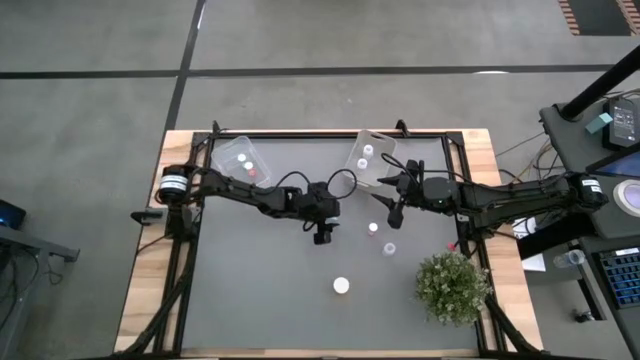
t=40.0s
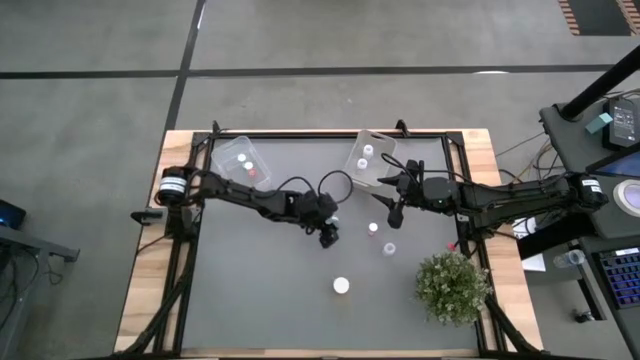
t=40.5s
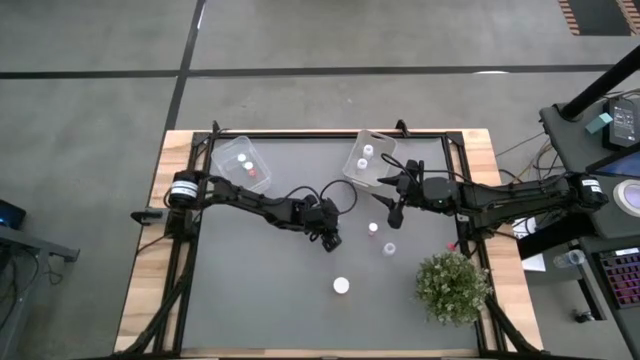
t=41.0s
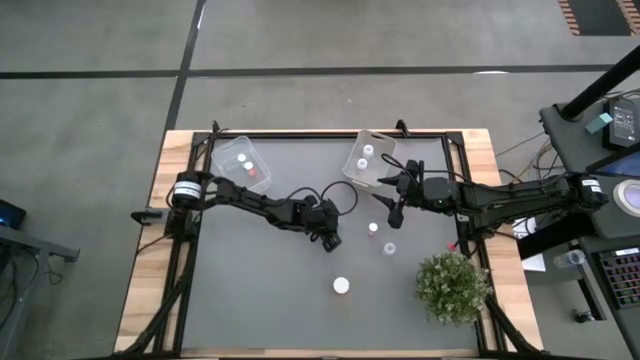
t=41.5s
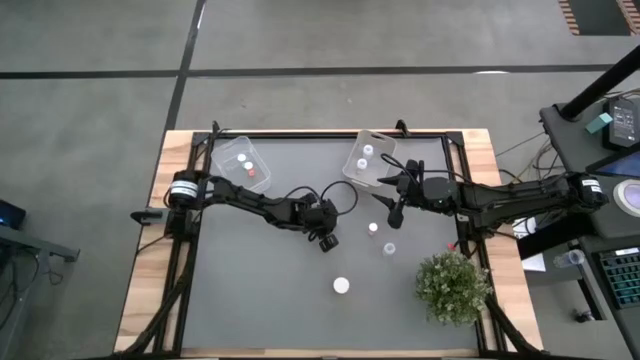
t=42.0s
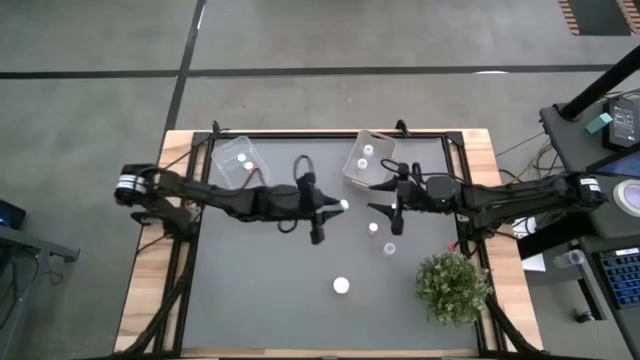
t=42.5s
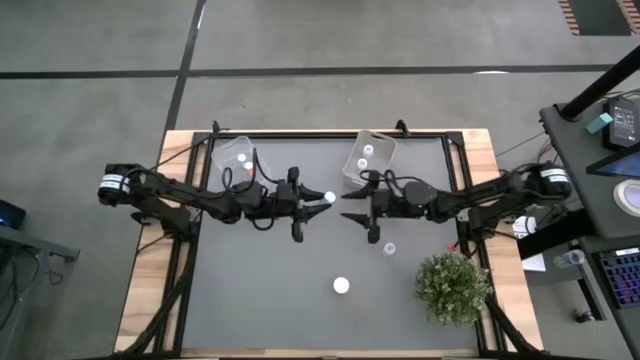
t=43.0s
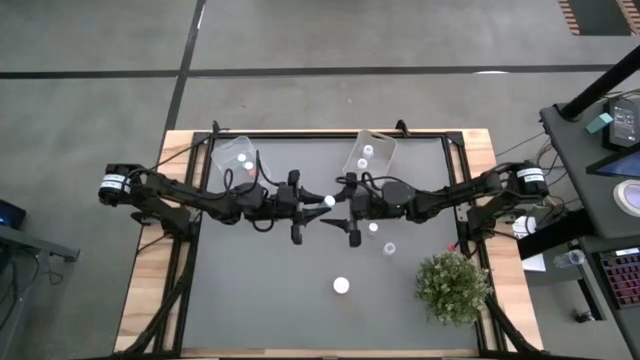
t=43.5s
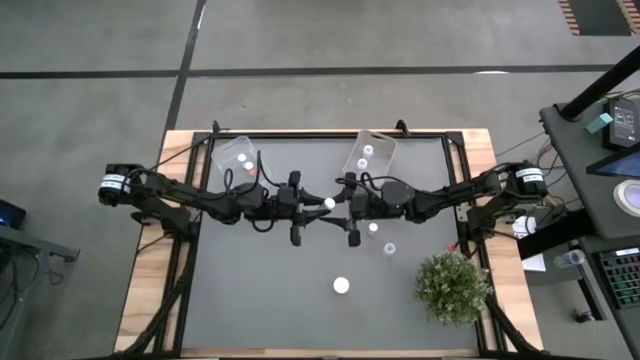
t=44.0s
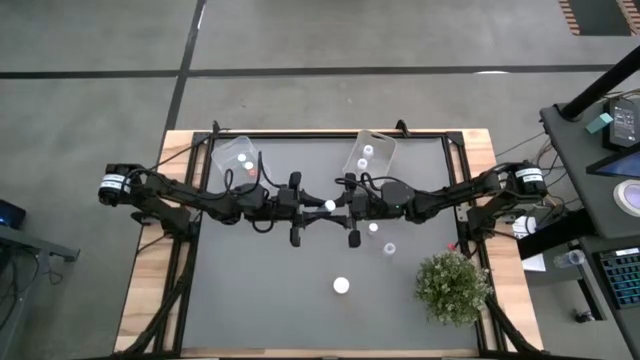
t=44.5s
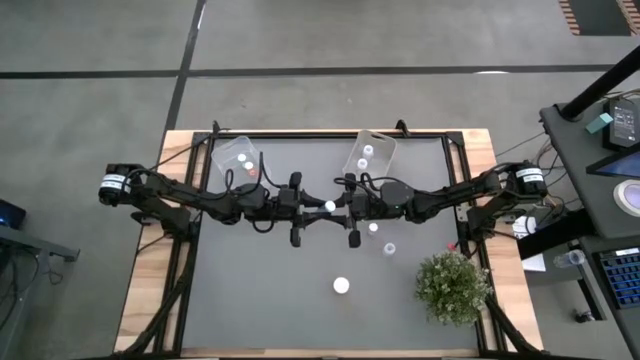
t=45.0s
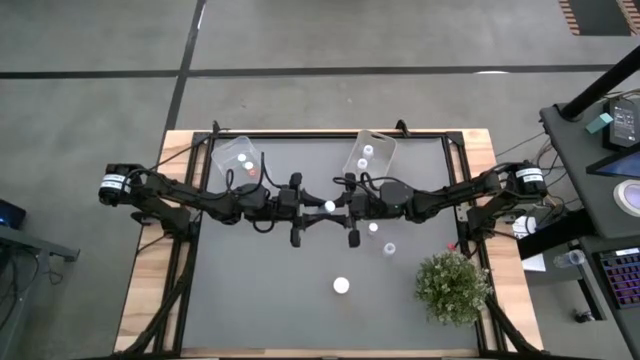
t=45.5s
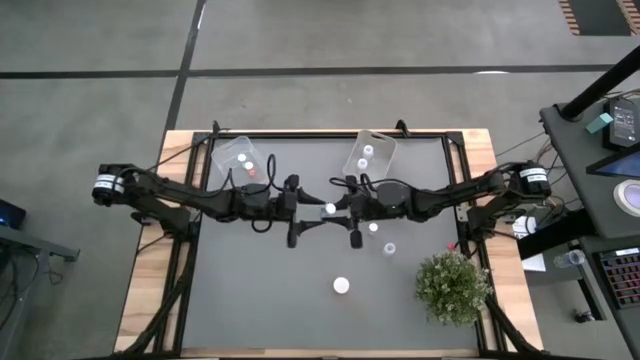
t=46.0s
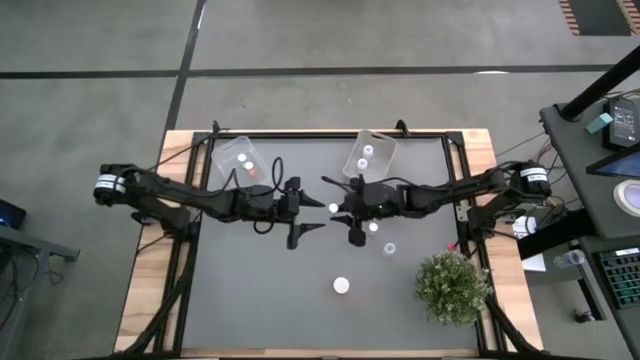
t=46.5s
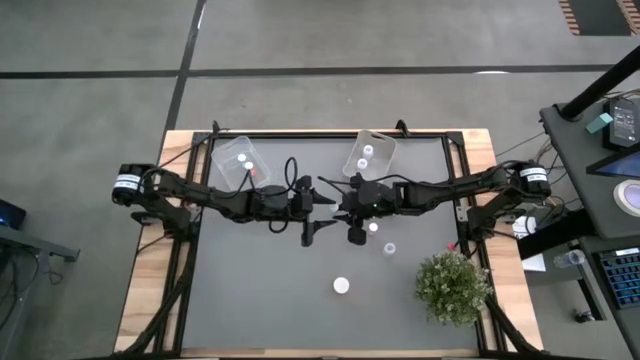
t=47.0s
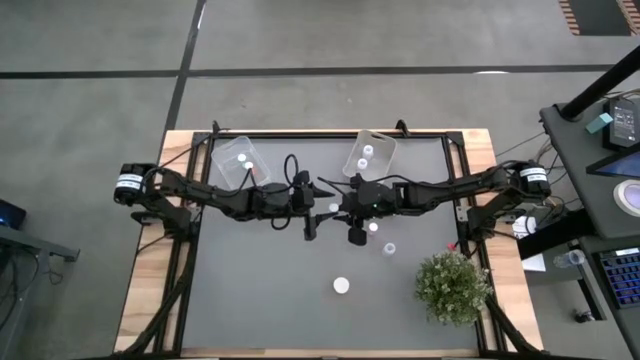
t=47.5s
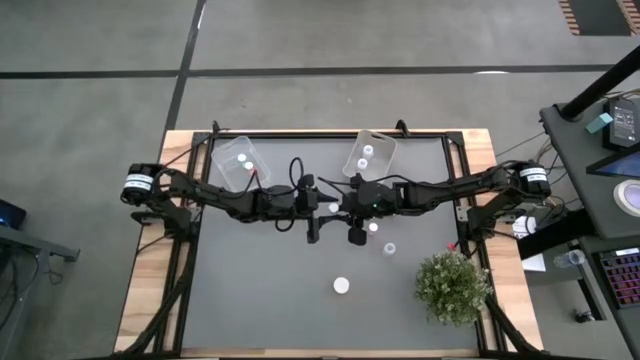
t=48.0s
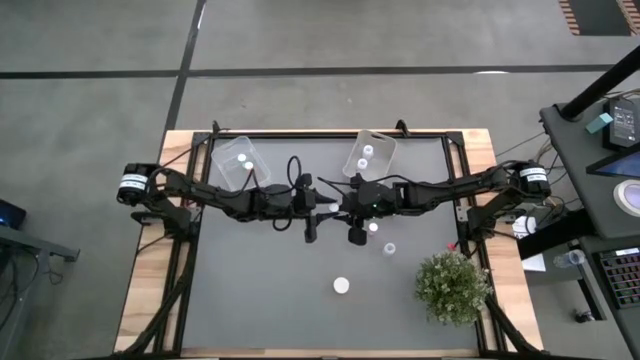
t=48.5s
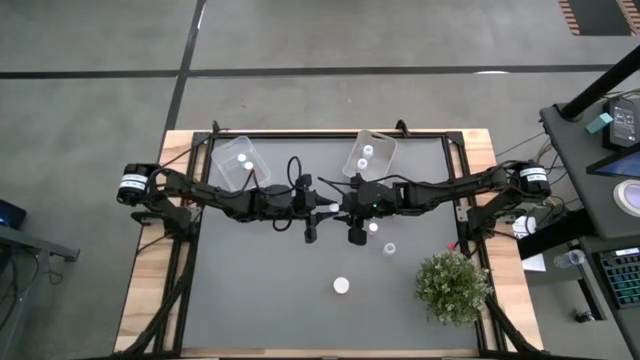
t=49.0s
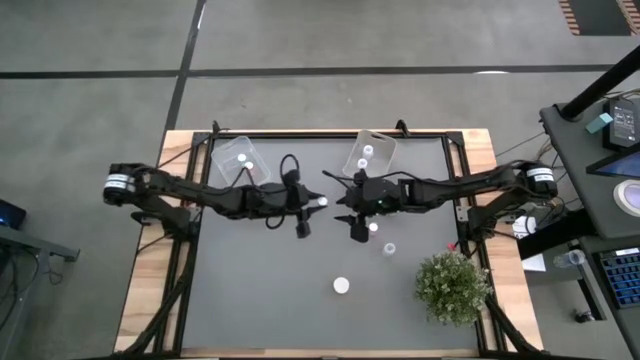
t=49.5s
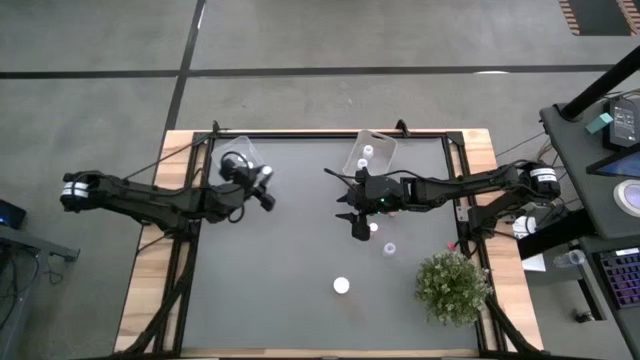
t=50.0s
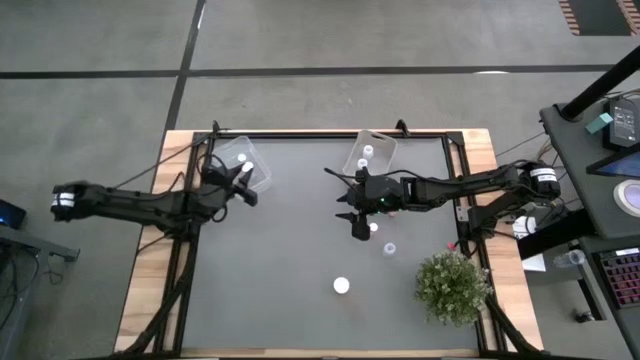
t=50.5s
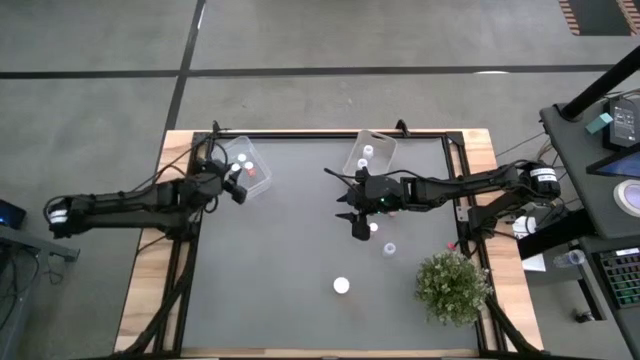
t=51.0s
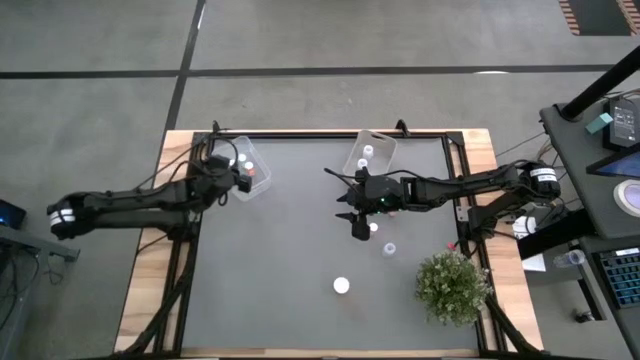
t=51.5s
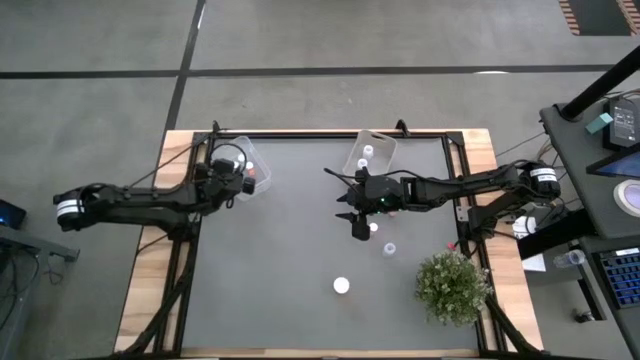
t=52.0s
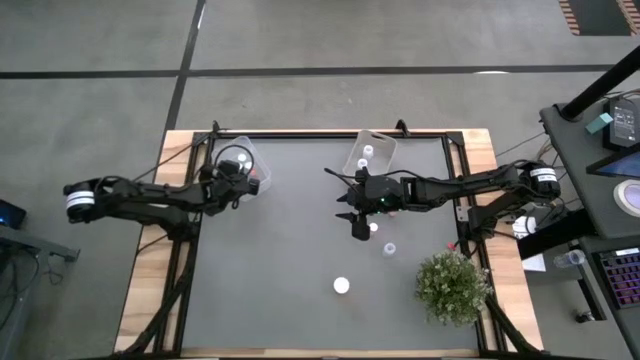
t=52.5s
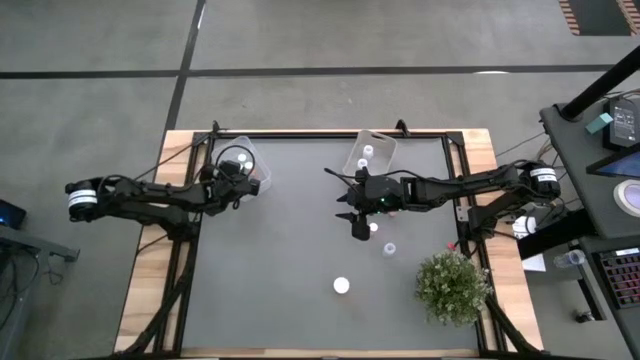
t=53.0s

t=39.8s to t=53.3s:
Task: Pick and place medicine bottles into bin by pill shape (circle, oval)
Put the blue pill bottle into the transparent bin

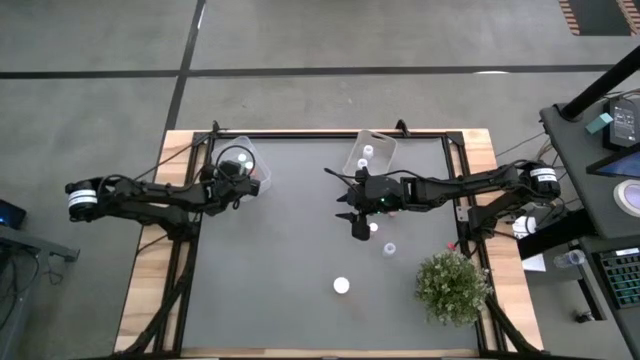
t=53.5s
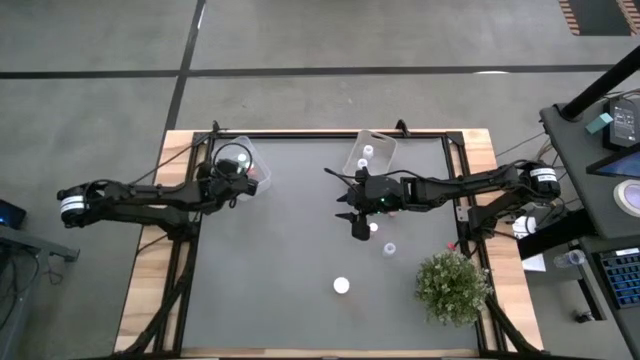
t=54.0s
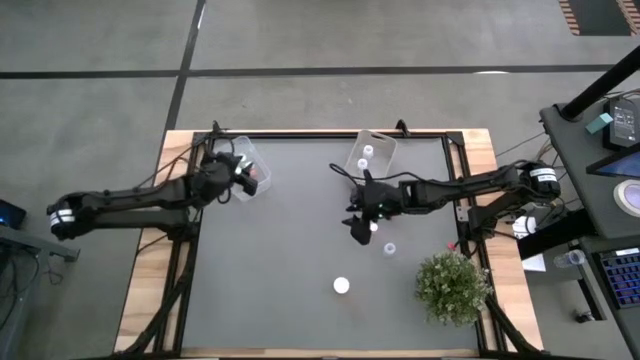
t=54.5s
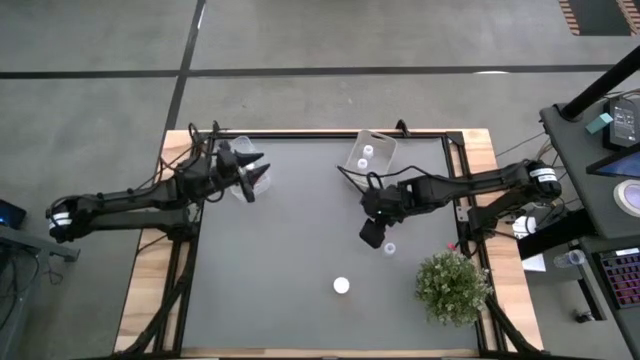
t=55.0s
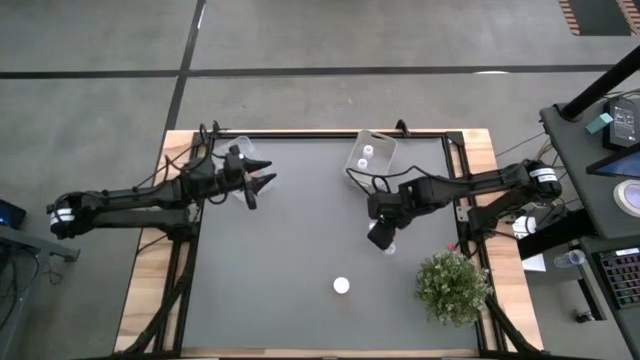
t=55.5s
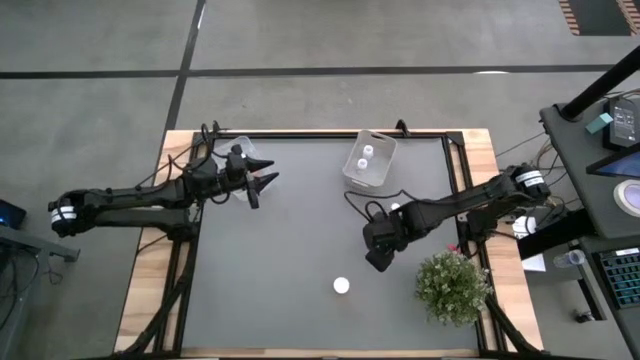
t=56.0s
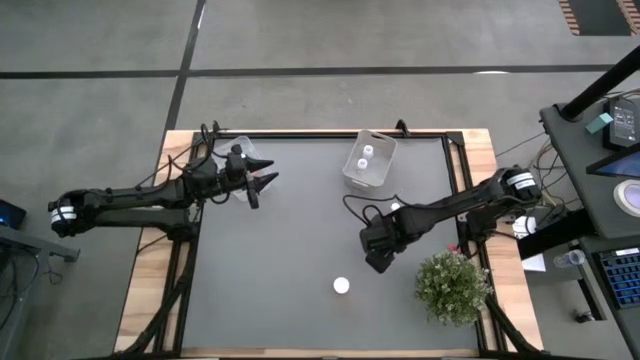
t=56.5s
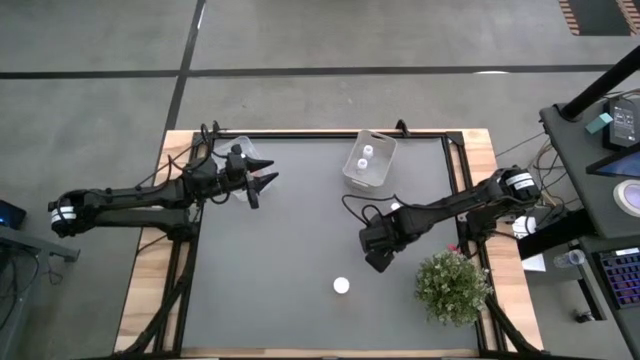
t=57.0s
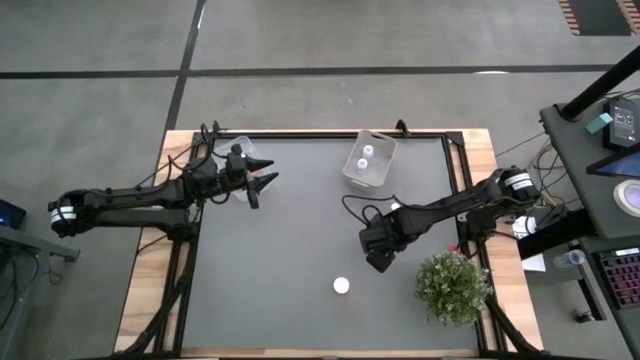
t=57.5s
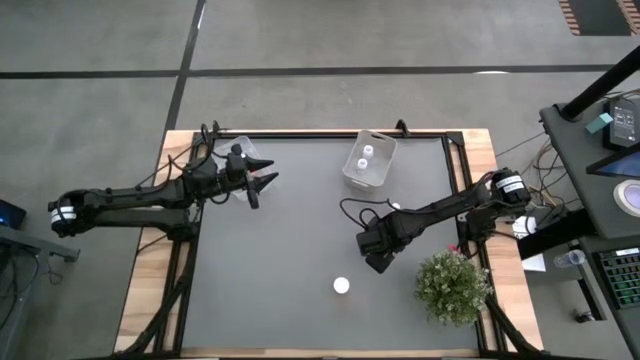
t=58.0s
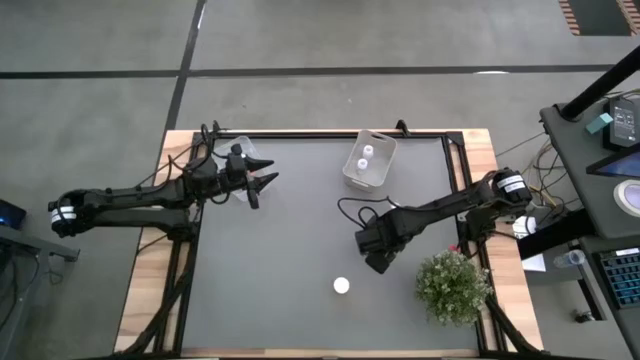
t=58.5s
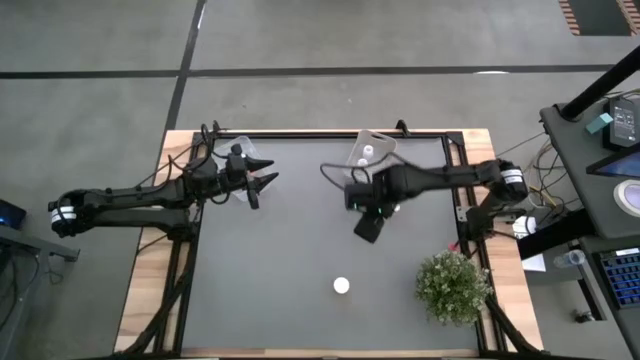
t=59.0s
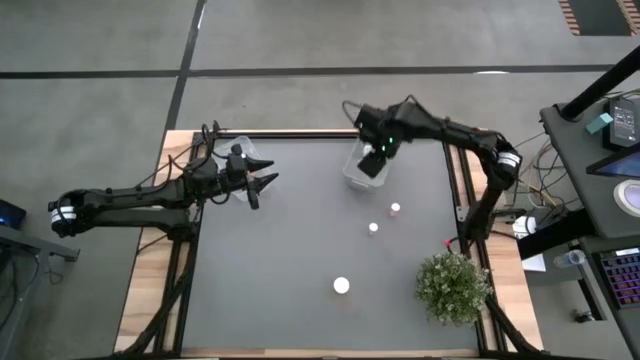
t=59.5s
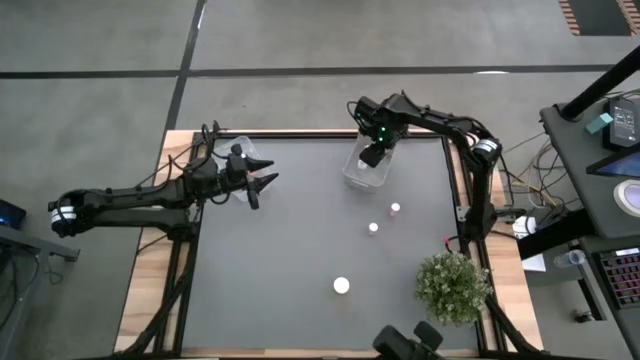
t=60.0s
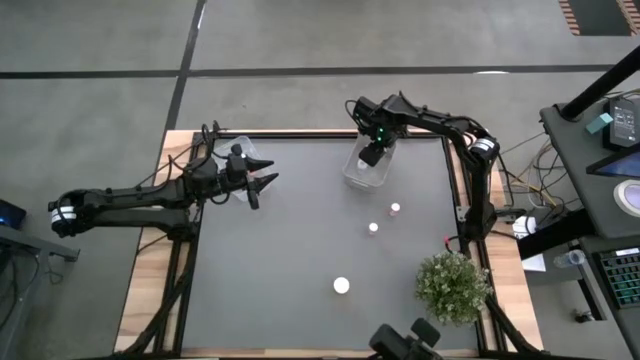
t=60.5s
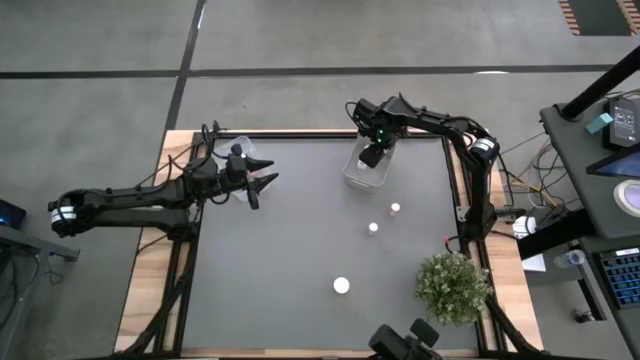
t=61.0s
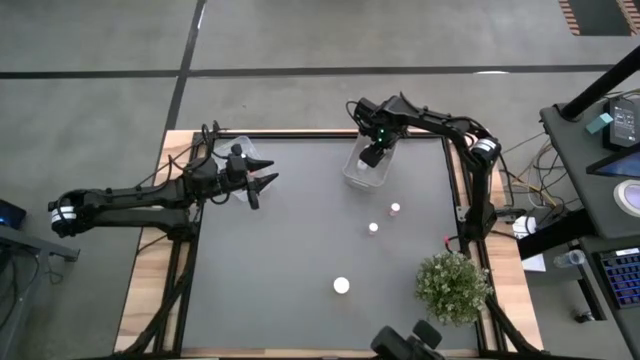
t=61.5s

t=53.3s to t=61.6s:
Put the white pill bottle into the gray bin

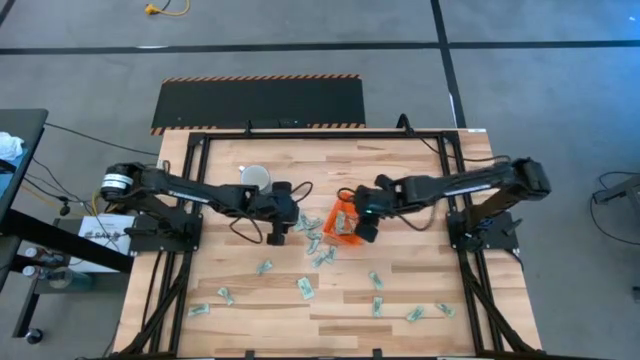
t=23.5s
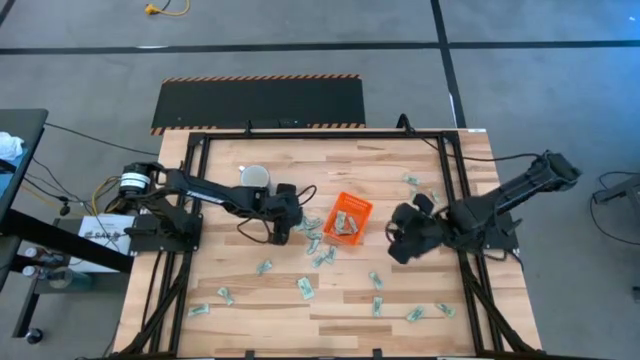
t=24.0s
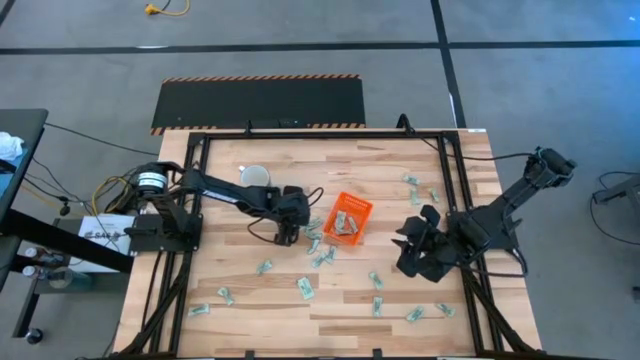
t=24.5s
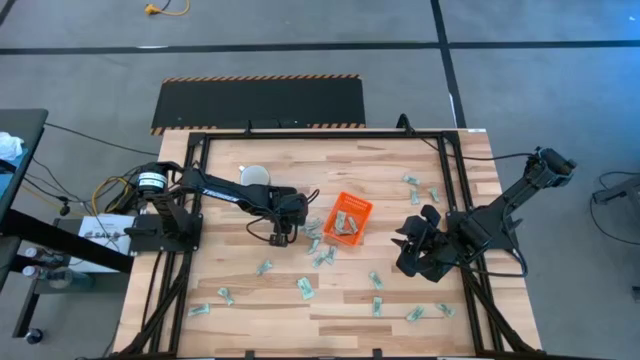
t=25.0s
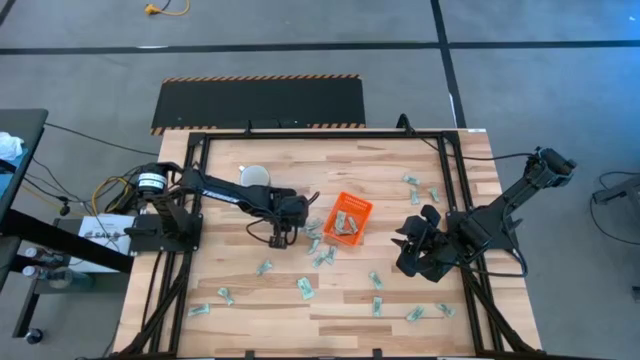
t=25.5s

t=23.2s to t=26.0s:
Task: Pick and place Stevia / Truvia into bins
Put the stevia packet into the basket
